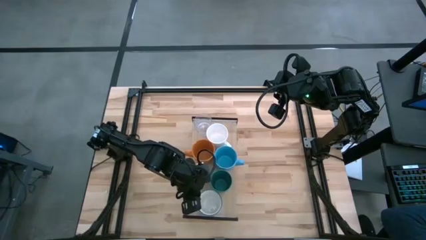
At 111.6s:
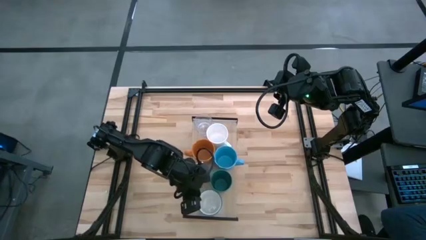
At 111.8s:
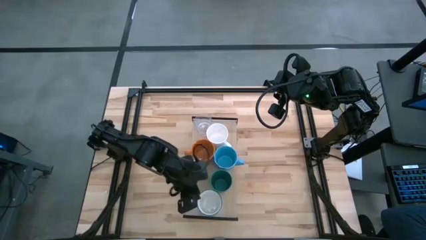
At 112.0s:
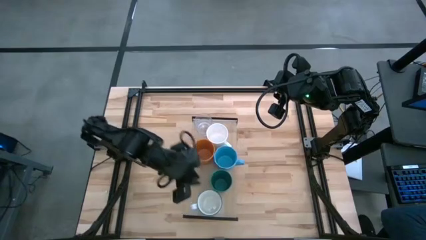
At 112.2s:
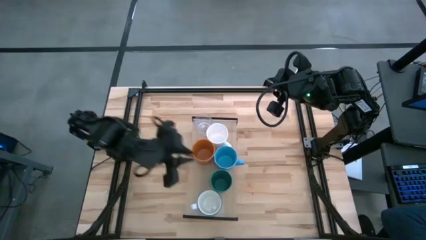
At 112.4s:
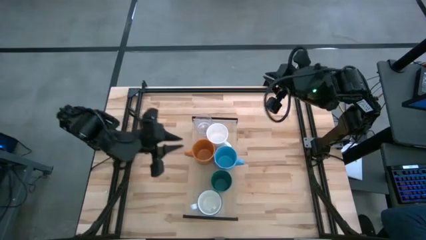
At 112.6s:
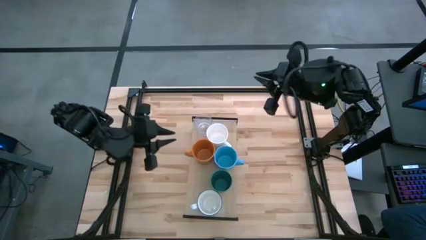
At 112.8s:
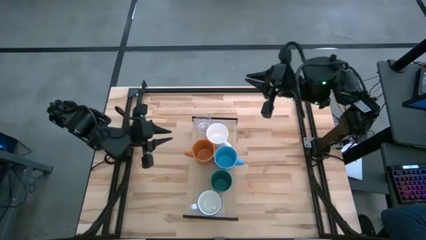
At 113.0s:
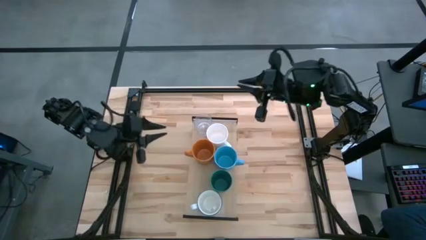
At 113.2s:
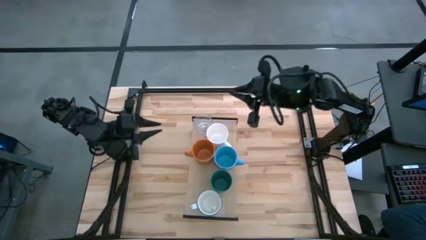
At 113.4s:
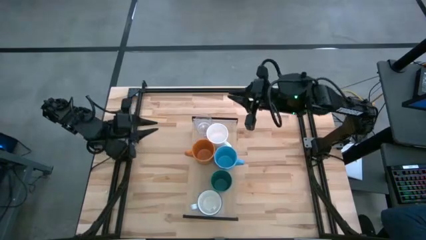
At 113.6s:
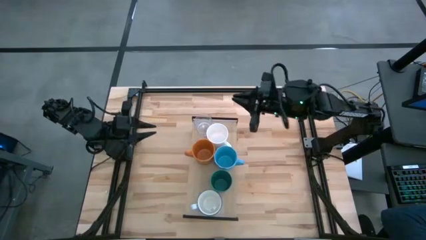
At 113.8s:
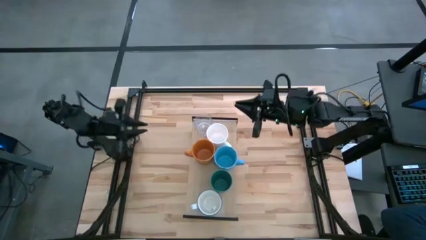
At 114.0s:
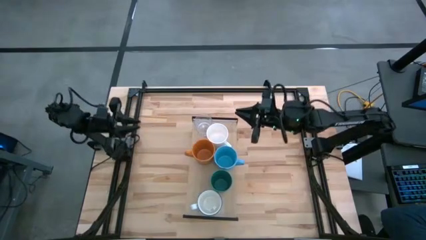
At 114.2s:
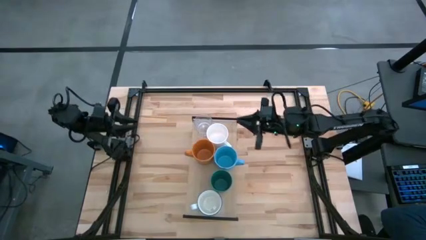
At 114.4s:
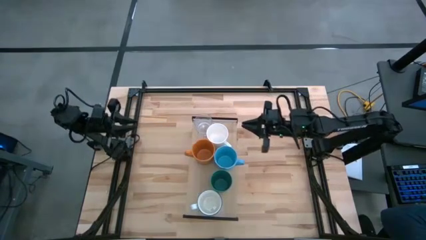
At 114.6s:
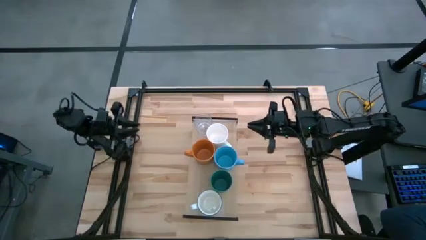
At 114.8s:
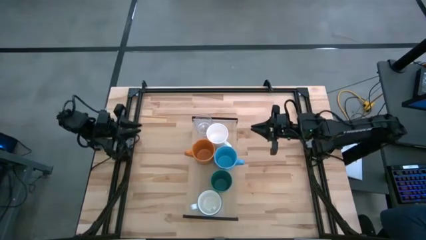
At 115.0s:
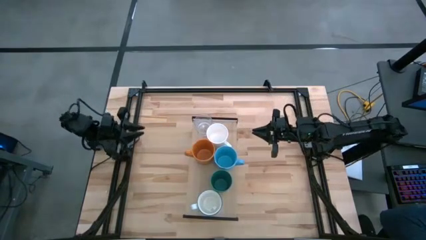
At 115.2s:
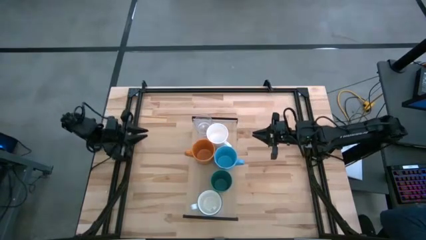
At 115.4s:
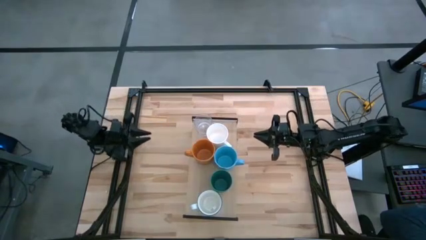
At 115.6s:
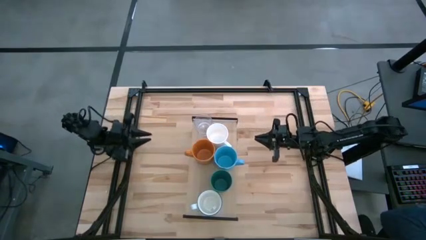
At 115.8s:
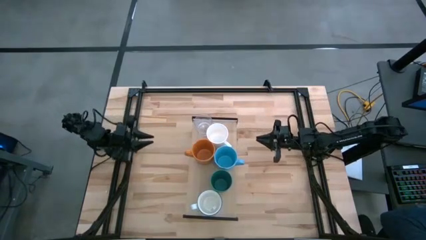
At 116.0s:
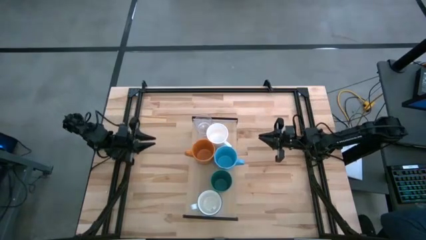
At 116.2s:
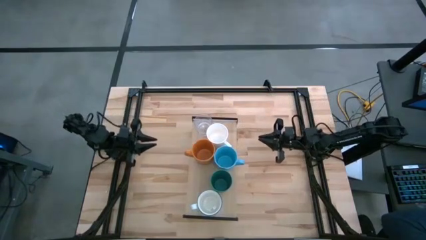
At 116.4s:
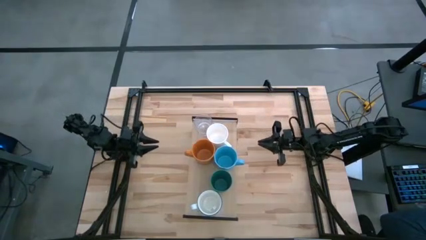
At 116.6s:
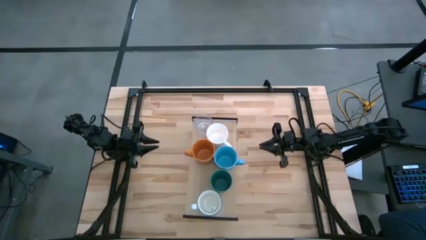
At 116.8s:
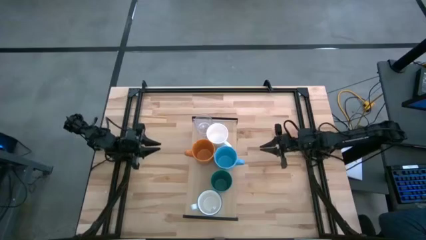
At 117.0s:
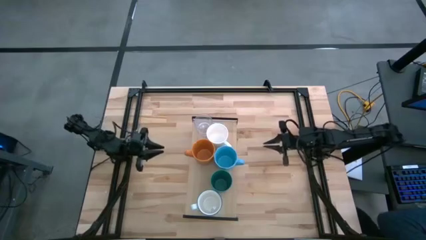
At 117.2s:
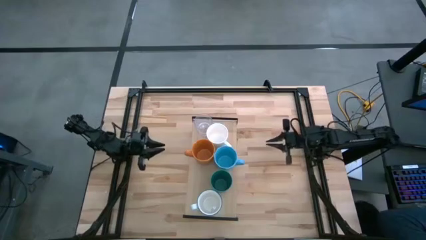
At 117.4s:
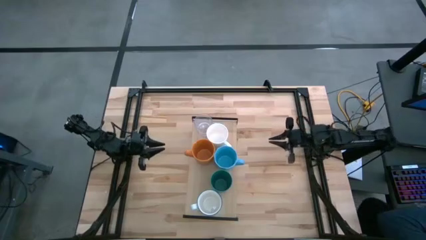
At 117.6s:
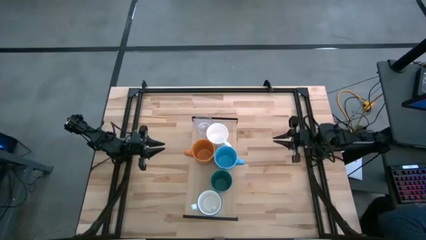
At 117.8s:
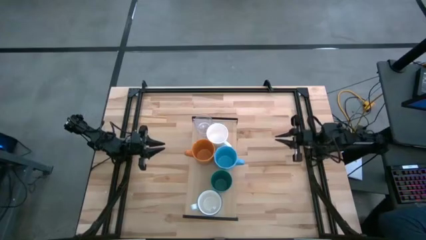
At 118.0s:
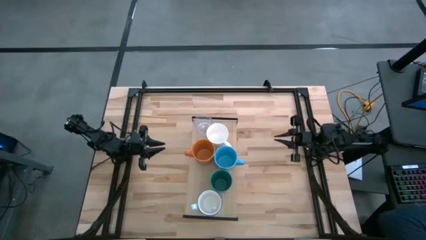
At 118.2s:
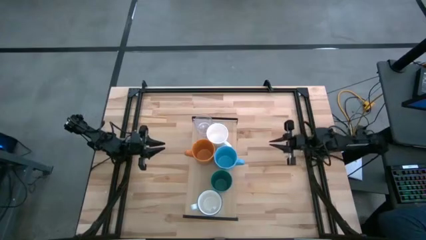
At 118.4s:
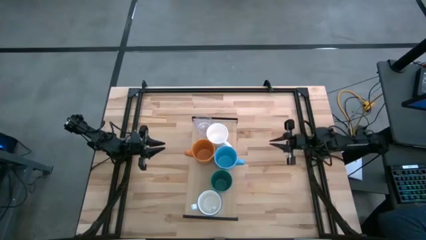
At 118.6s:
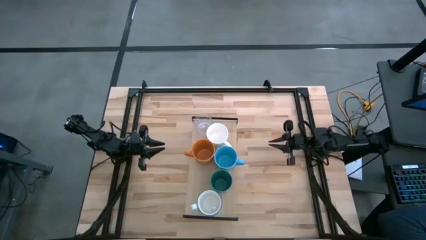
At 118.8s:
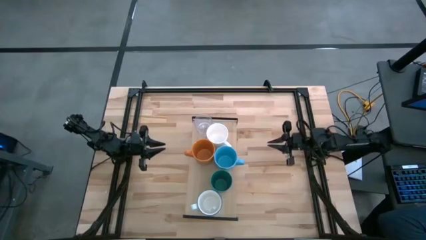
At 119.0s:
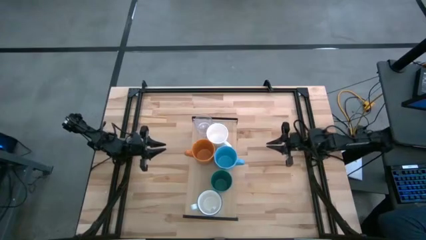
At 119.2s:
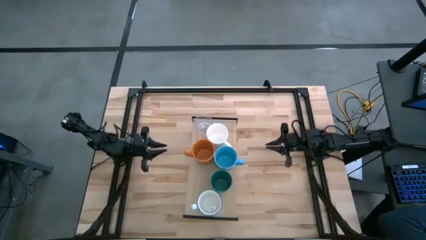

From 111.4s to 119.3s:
Task: Stack small to large cups/mugs on shelf
Return to Home Position

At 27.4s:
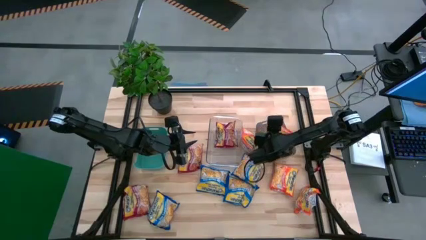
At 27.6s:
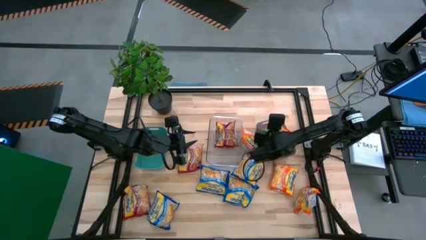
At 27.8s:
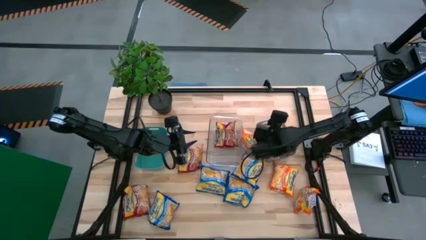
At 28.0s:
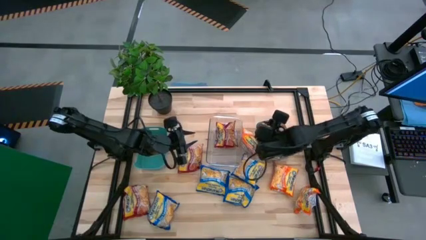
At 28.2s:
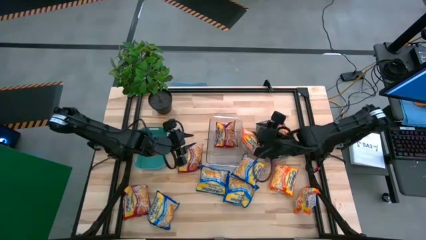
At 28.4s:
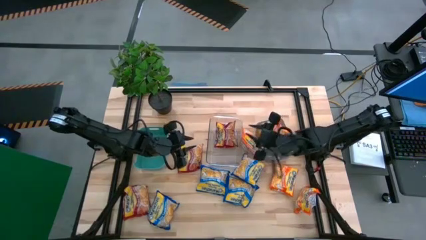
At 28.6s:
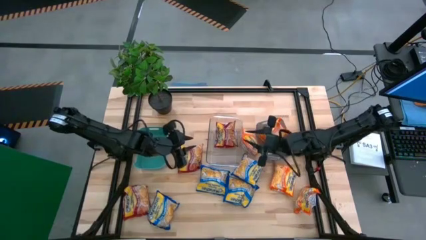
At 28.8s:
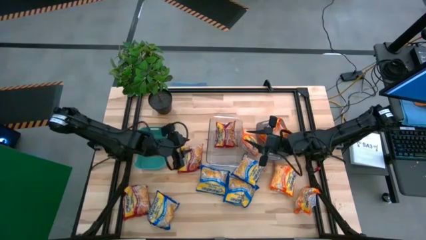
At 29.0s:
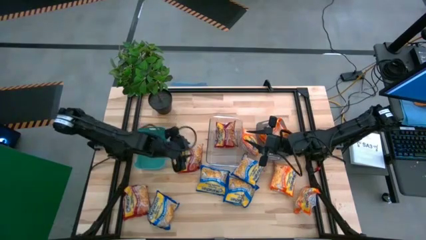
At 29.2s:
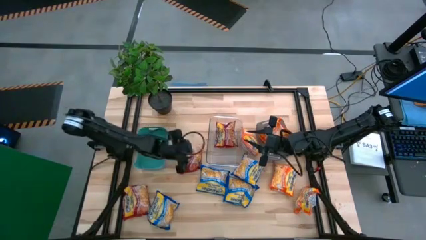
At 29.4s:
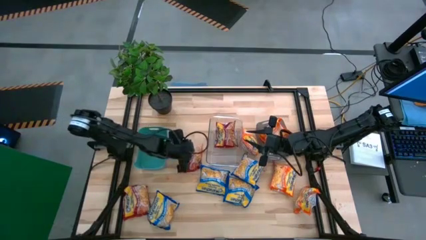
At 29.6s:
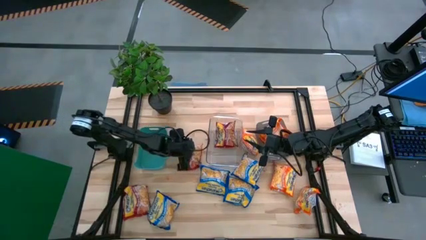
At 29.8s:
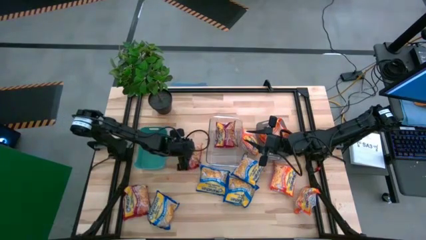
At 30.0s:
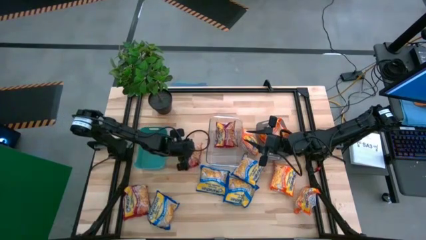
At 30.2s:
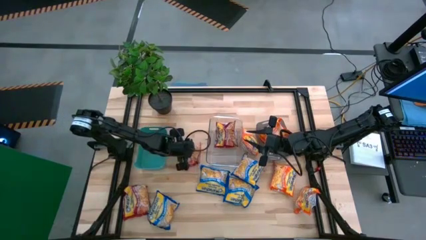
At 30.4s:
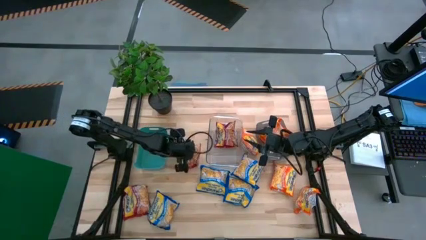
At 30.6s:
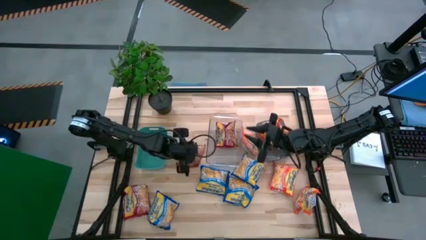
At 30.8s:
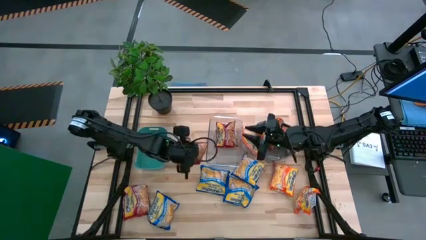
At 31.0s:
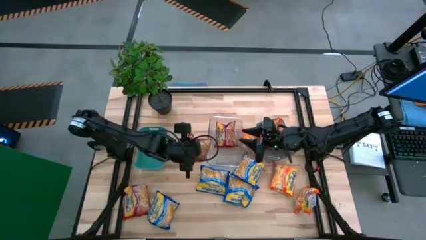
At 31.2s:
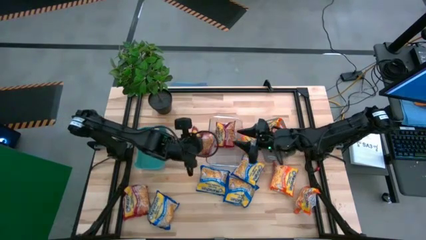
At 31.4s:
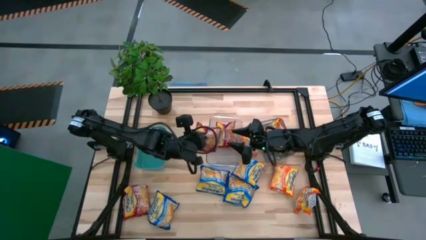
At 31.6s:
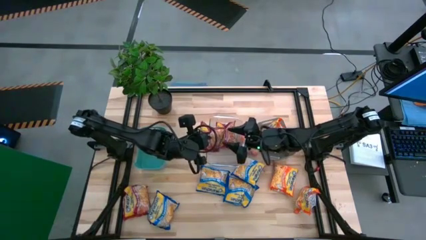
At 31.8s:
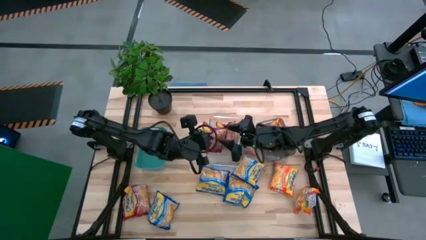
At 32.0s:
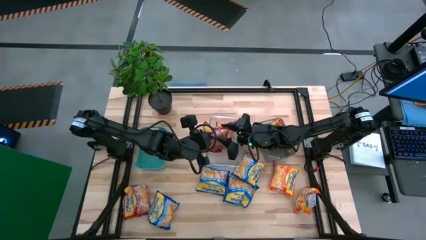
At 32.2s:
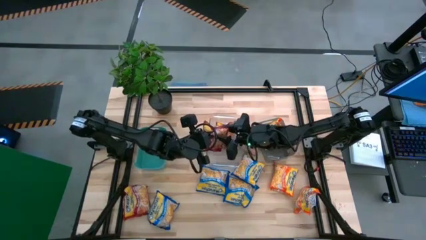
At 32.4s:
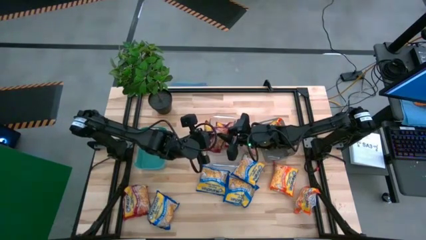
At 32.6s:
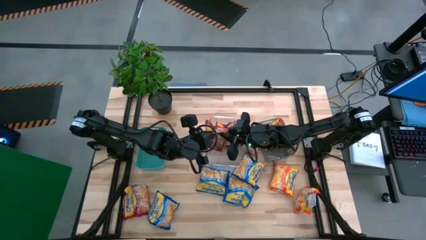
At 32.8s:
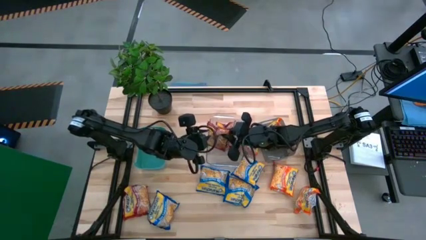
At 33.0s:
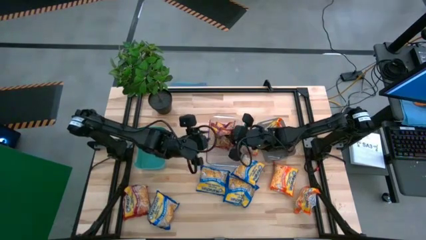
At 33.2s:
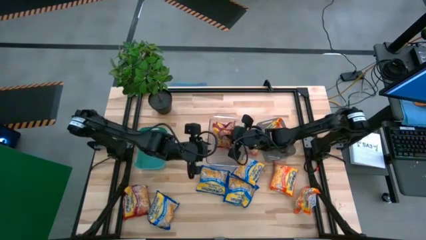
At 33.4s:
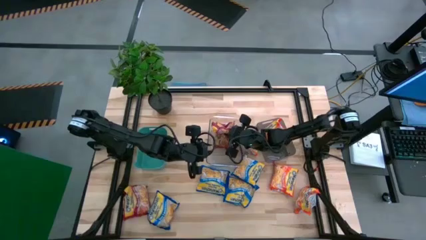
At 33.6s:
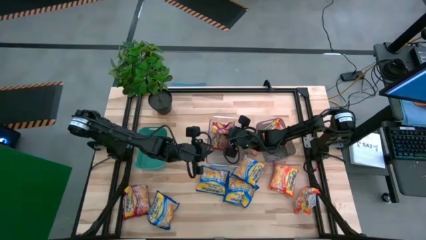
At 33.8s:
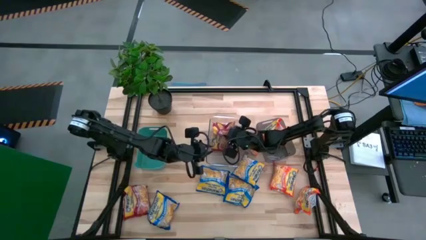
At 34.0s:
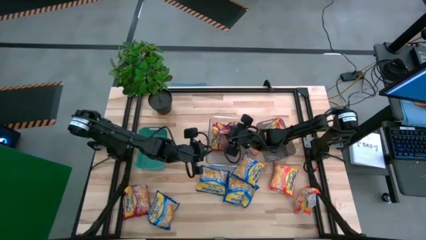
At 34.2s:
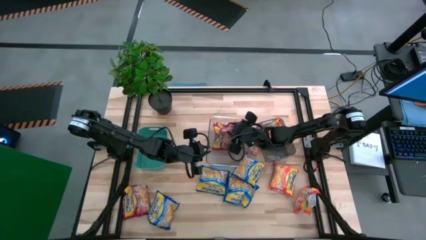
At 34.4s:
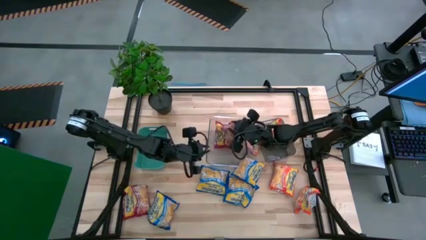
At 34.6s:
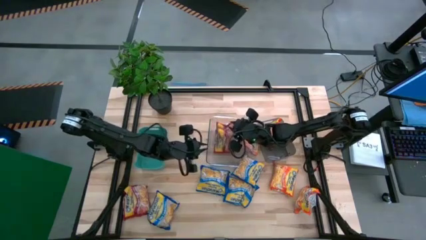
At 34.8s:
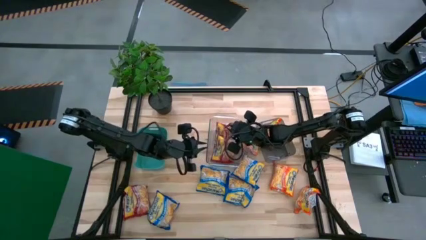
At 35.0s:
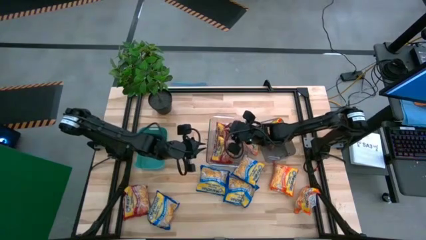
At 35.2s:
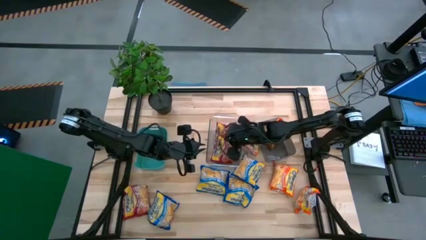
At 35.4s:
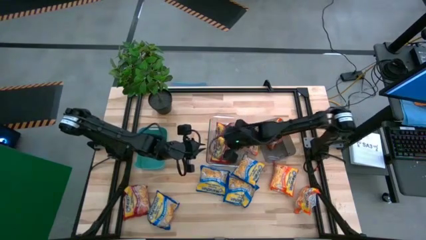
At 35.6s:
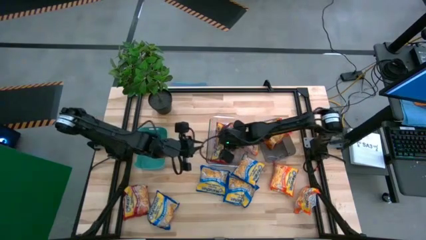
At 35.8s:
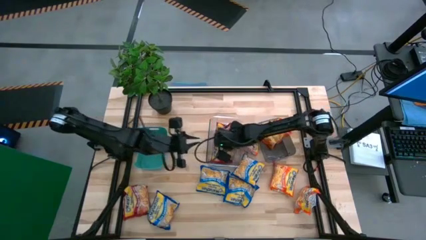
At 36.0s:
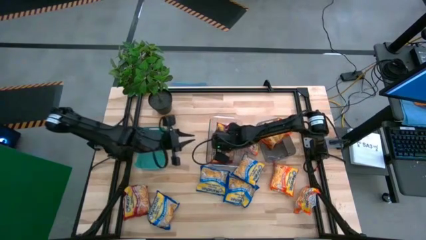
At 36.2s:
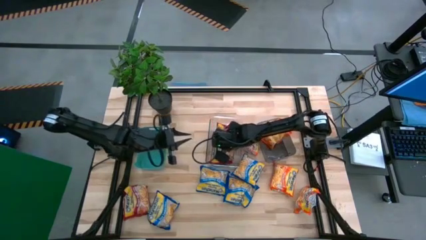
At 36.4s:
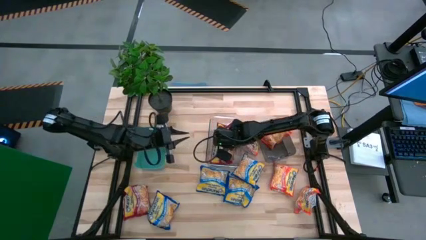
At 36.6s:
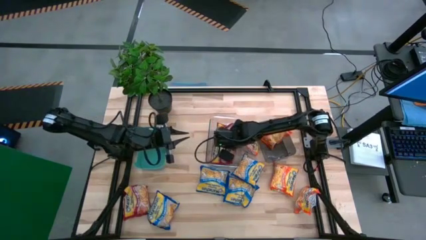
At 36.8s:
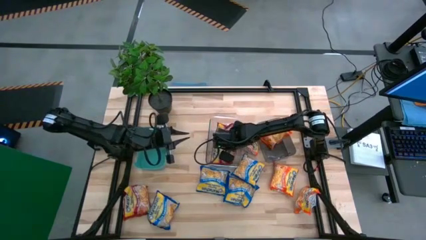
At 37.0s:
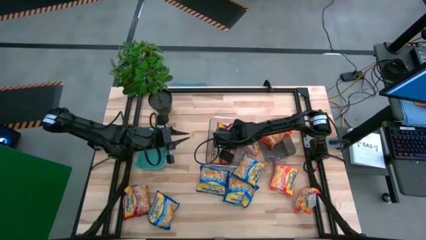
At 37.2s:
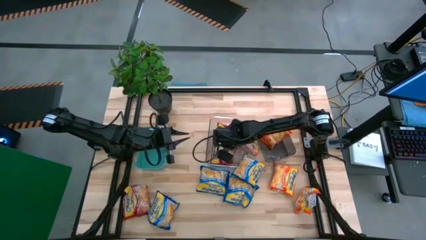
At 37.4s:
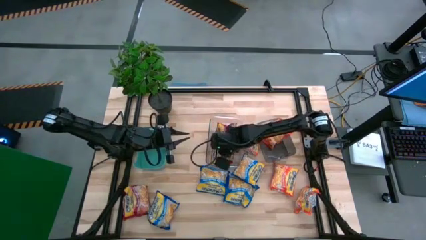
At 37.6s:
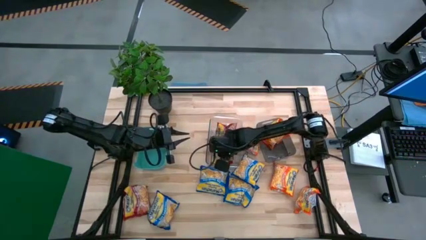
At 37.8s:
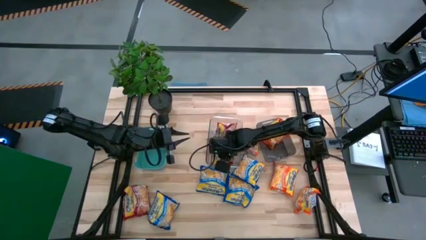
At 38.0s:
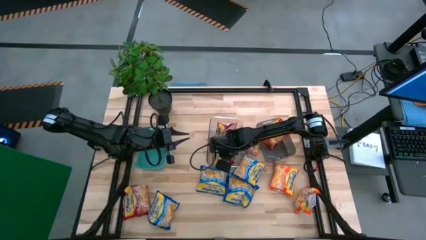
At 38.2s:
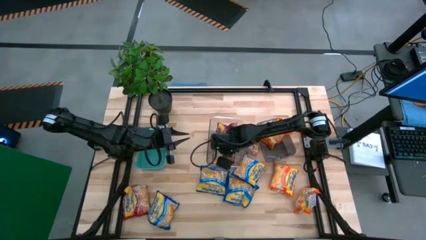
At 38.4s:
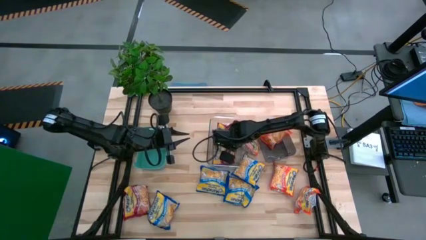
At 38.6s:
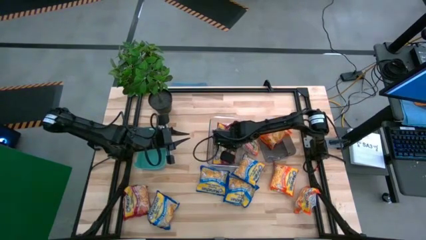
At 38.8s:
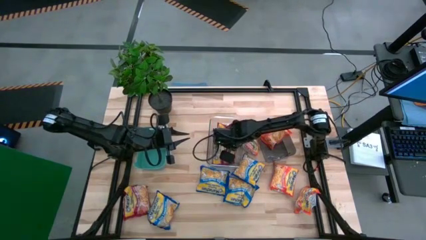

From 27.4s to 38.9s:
Task: Sort Maruchan noodles
Put the red noodle pack into the transparent bin
